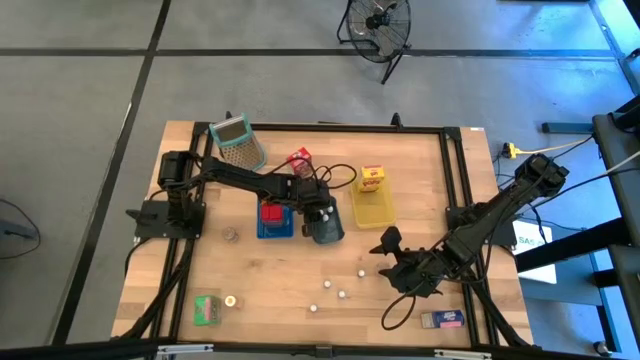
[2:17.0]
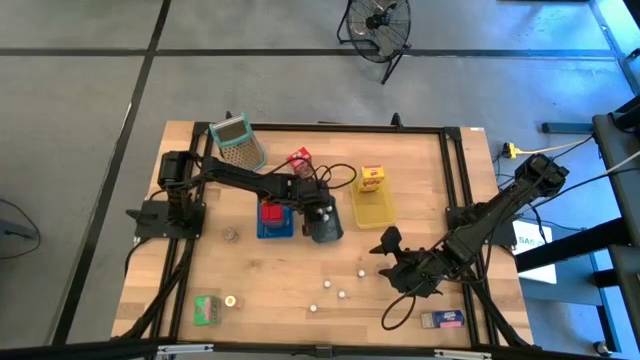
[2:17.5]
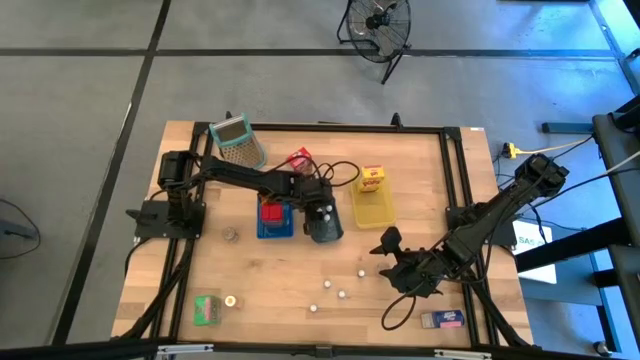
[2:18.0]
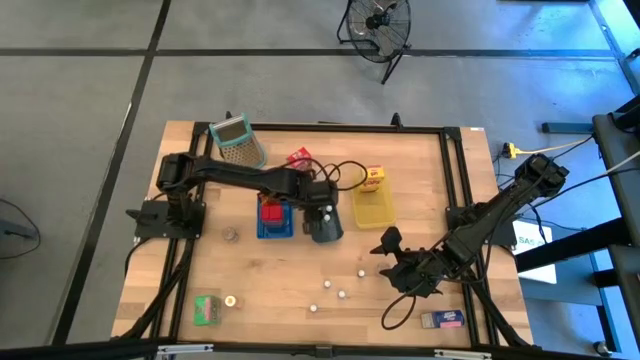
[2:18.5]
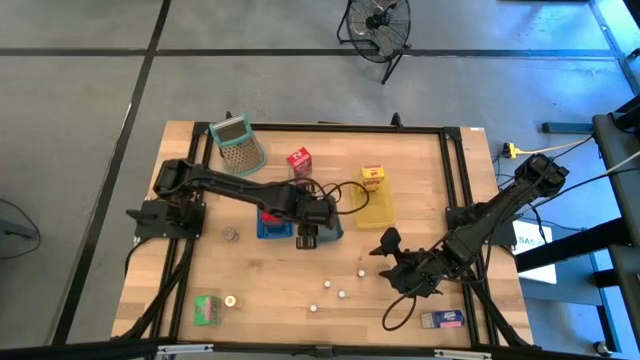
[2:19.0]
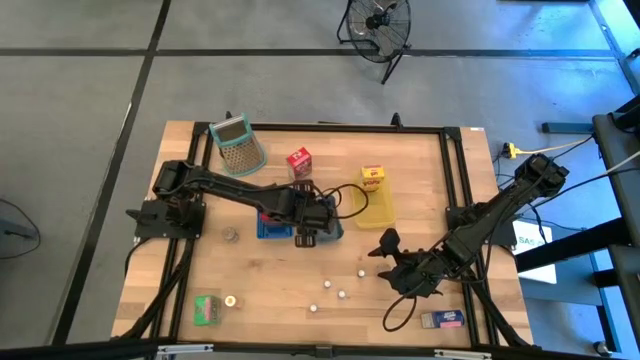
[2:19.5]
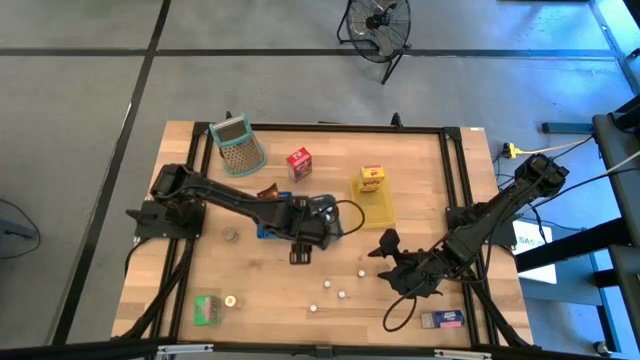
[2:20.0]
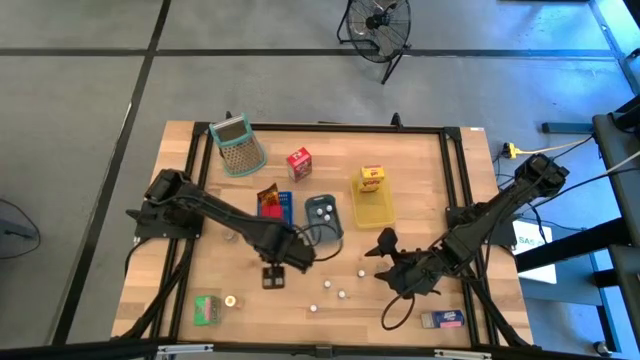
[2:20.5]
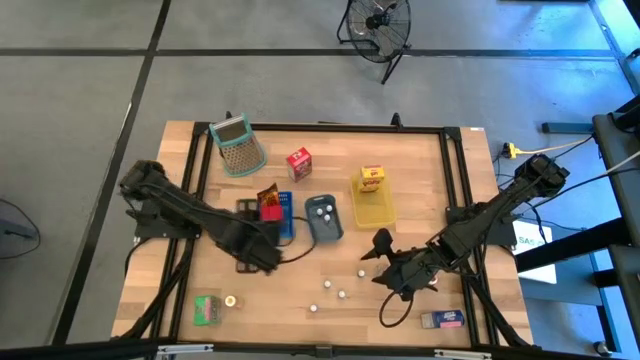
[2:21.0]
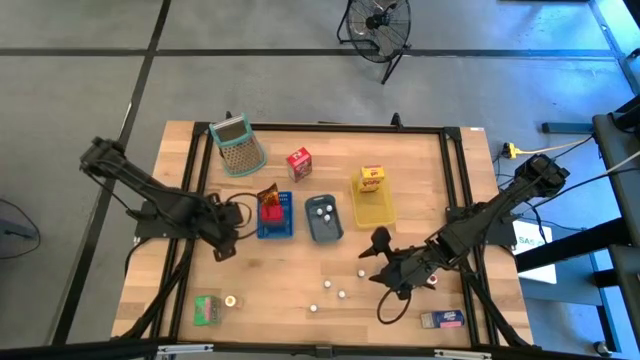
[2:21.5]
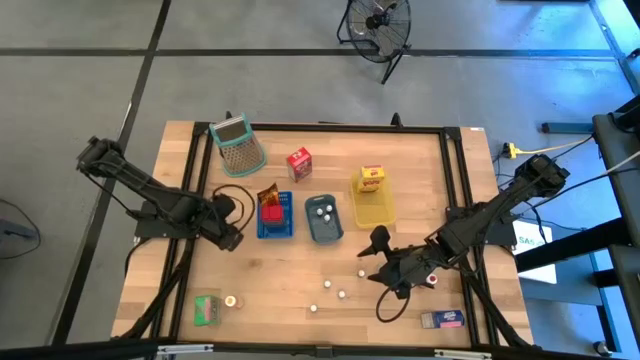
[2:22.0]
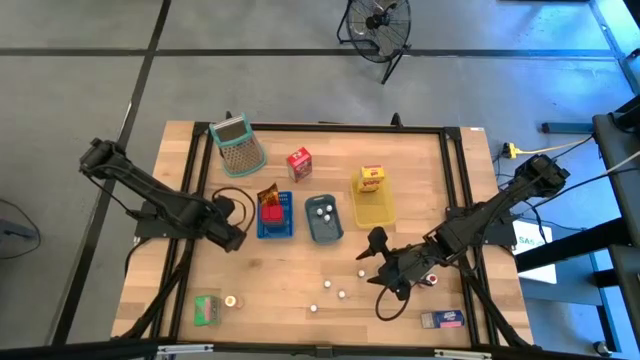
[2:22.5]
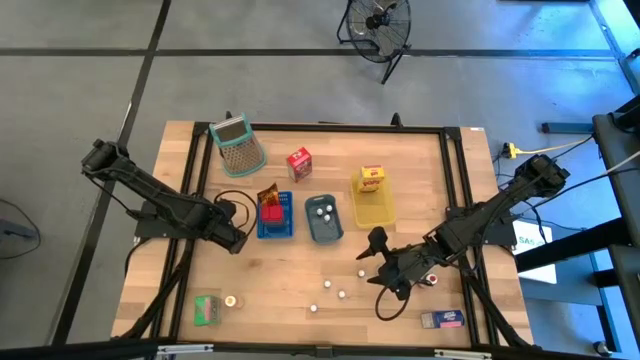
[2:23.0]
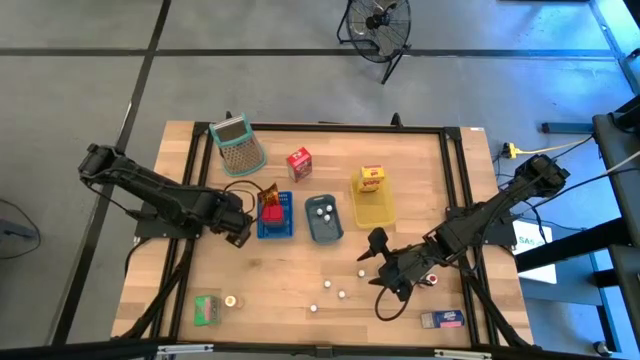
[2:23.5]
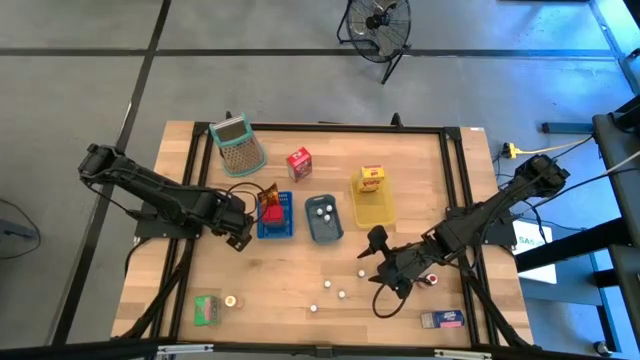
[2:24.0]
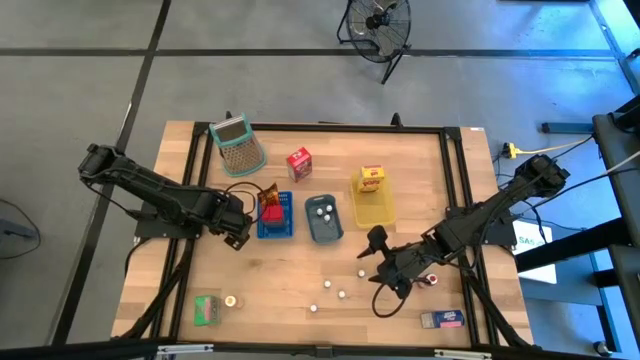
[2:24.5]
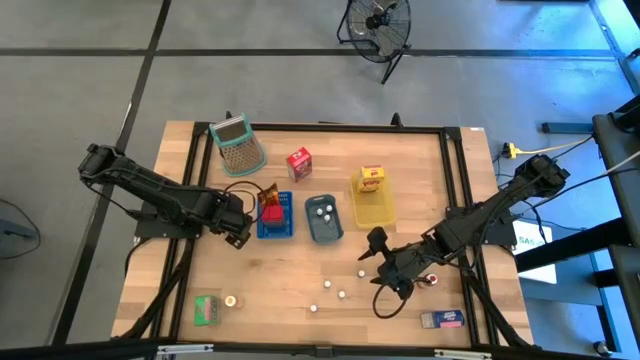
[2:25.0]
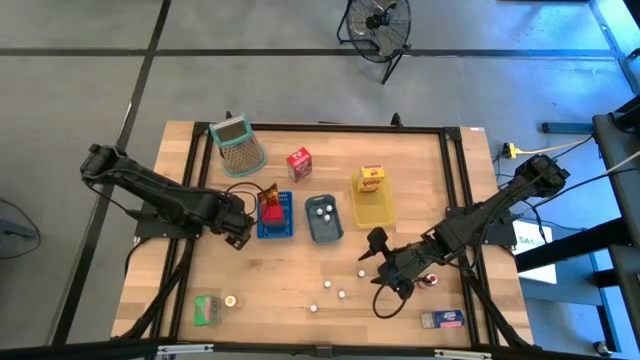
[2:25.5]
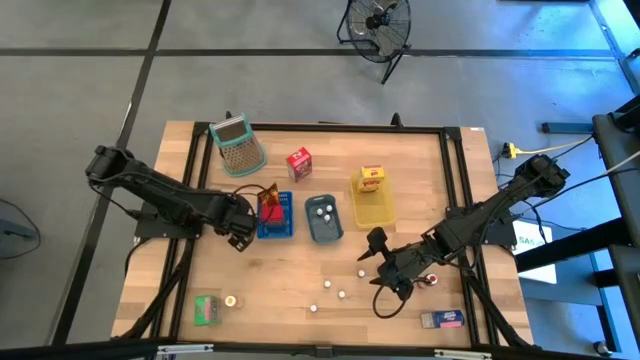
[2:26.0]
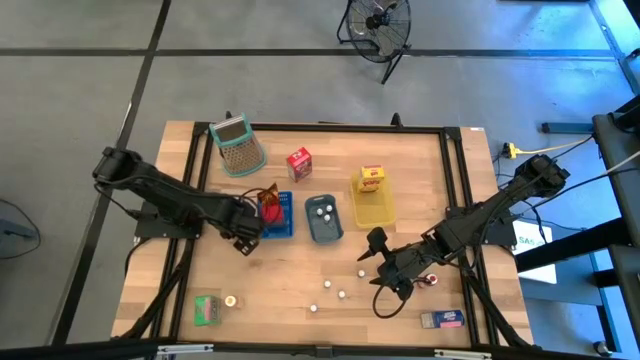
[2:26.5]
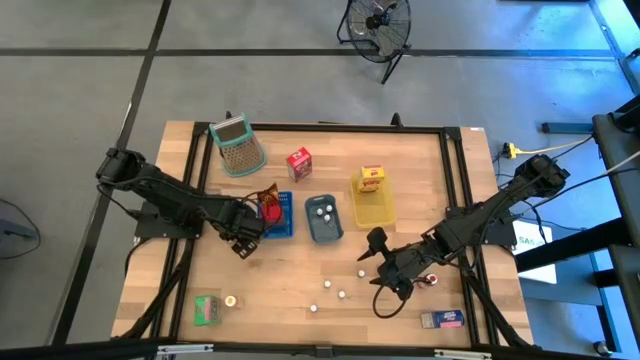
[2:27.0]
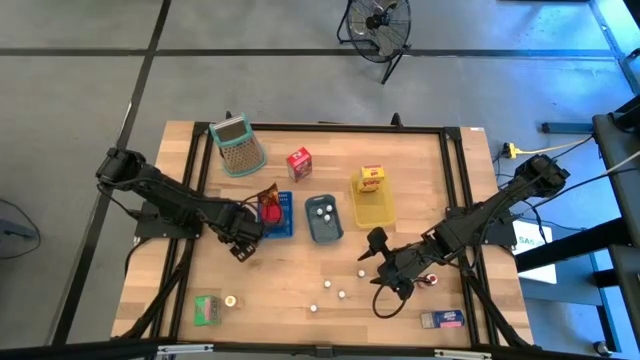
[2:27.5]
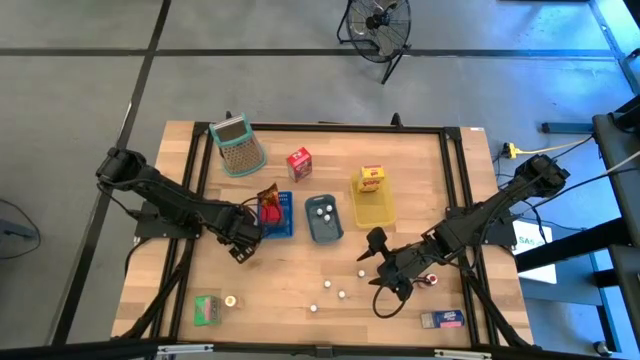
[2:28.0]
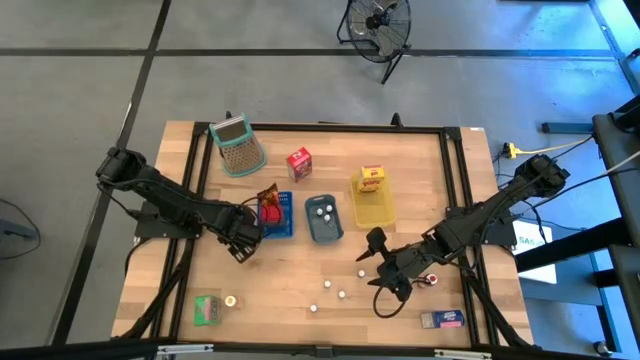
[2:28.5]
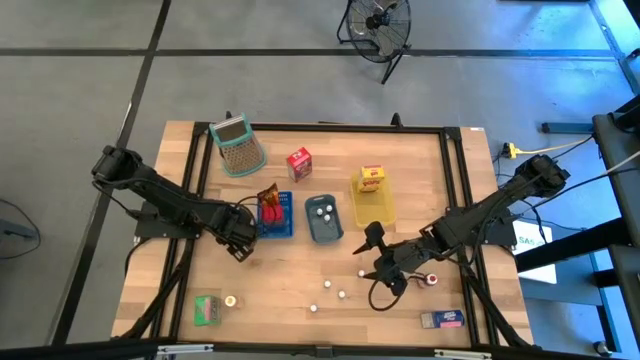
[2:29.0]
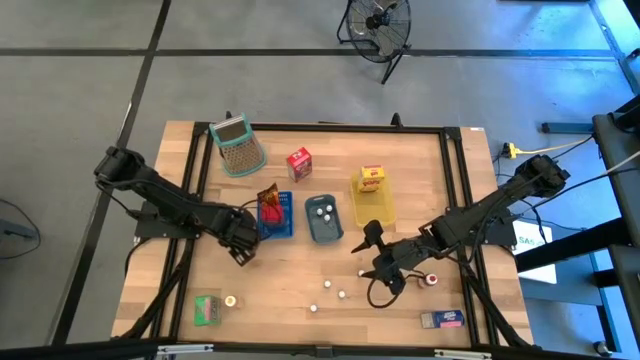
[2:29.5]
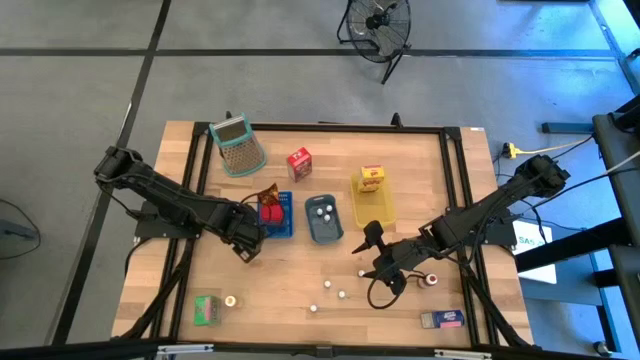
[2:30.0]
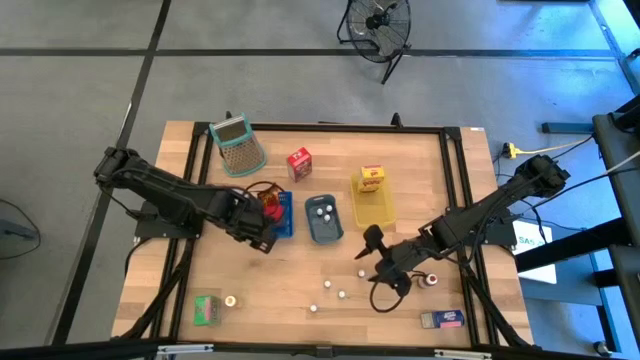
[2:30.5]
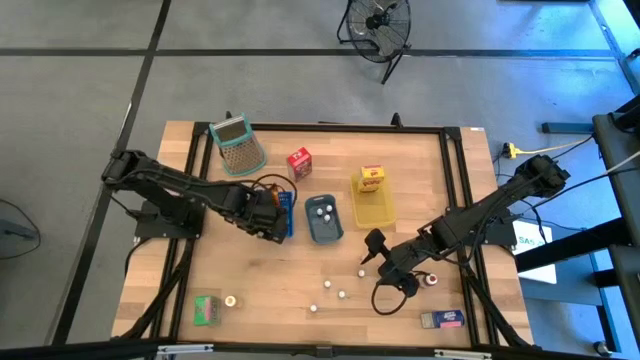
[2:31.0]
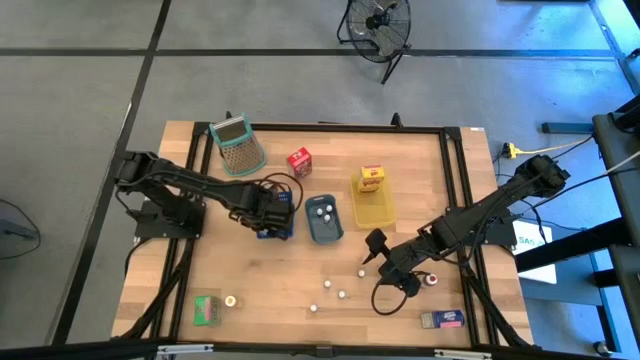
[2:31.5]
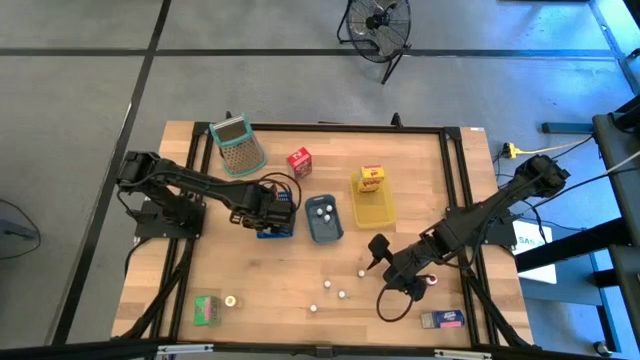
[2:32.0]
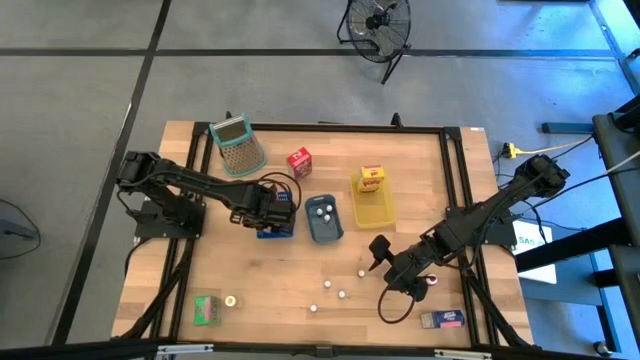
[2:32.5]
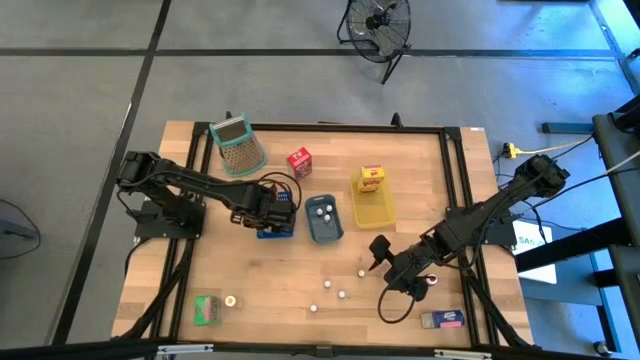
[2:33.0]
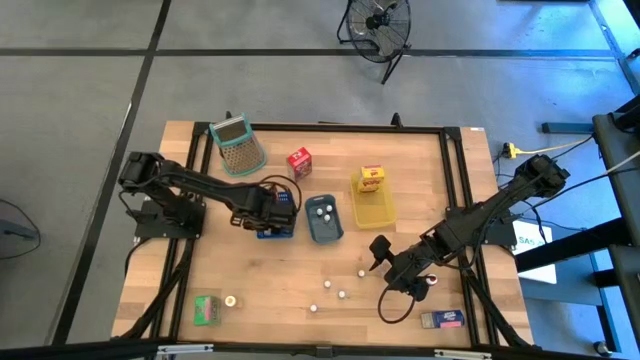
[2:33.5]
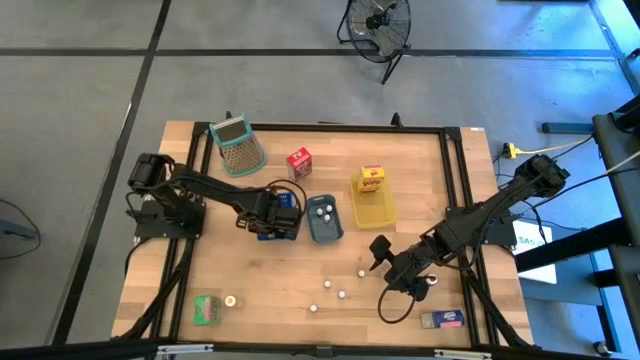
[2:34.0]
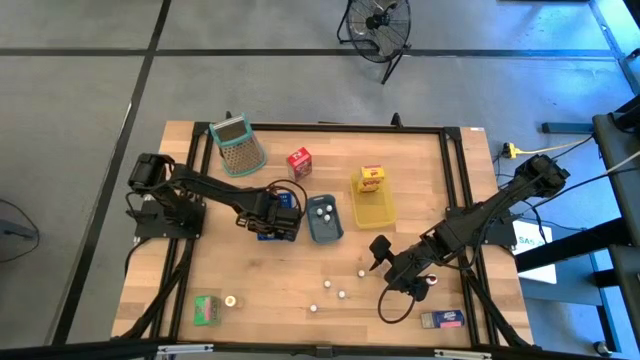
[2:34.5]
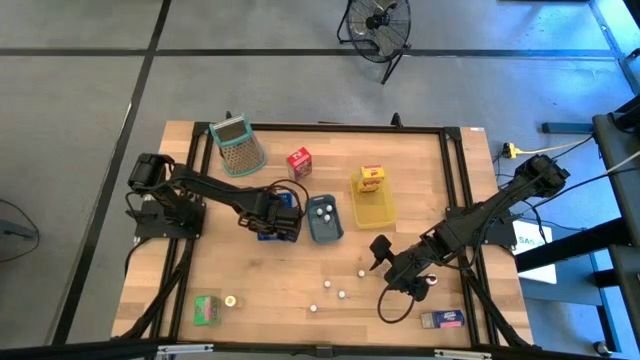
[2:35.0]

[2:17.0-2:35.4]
Task: Pick & Place Kitchen Items
Put the left brown seasoning bottle into the blue bin

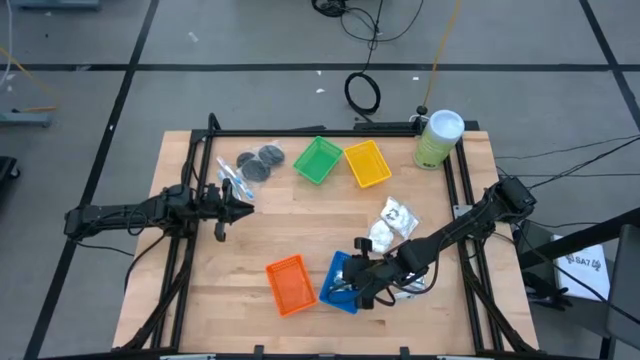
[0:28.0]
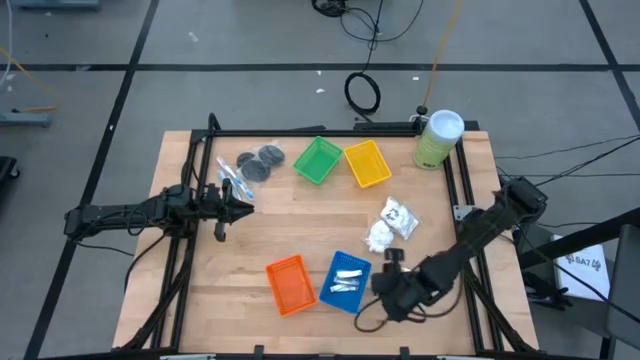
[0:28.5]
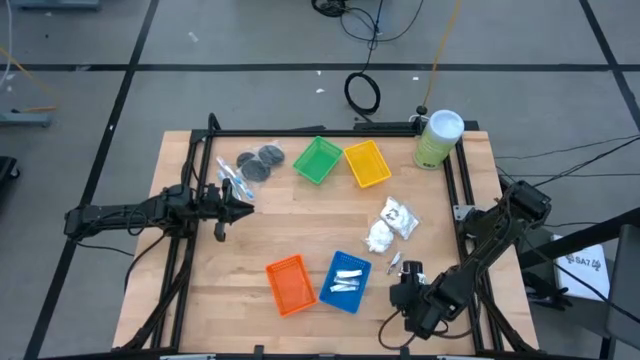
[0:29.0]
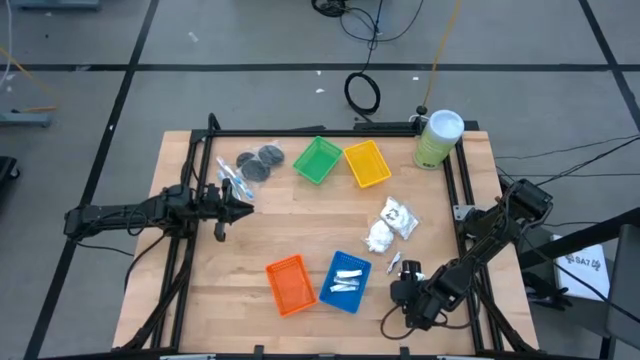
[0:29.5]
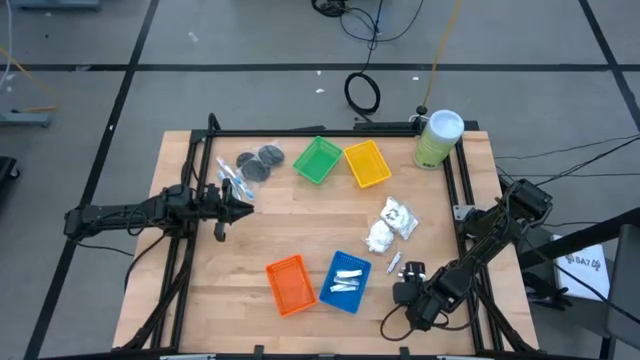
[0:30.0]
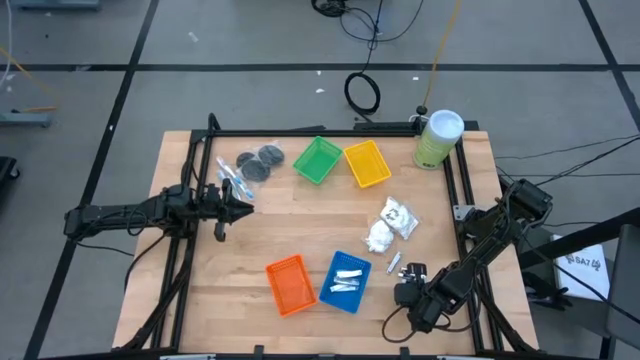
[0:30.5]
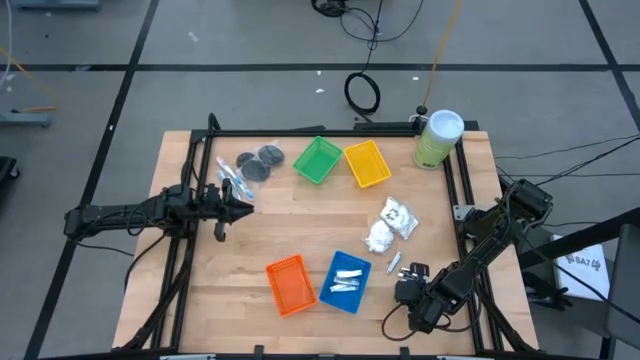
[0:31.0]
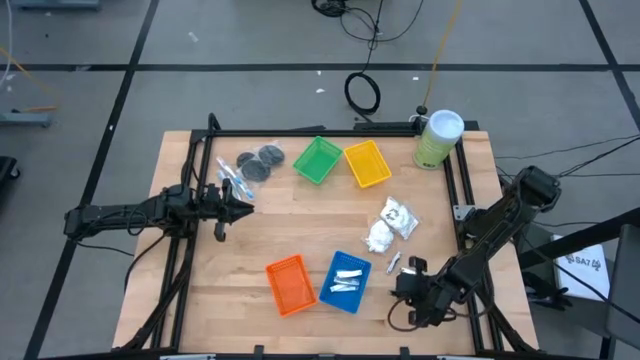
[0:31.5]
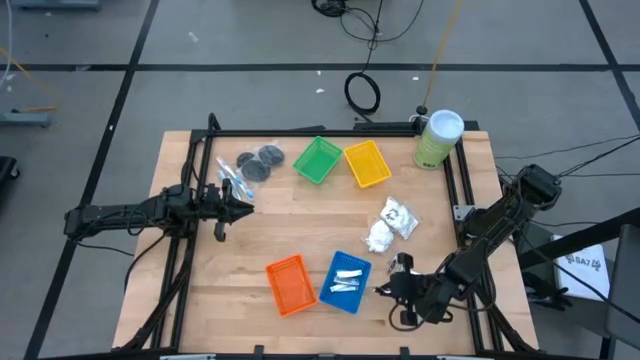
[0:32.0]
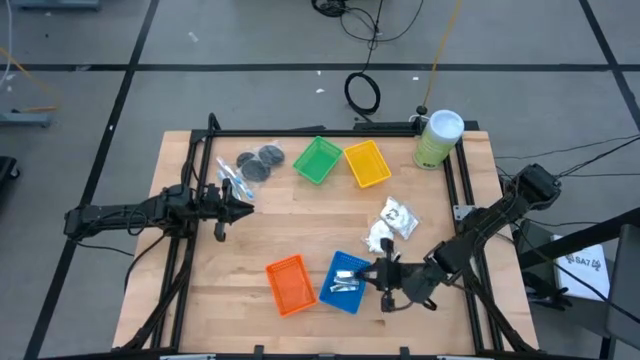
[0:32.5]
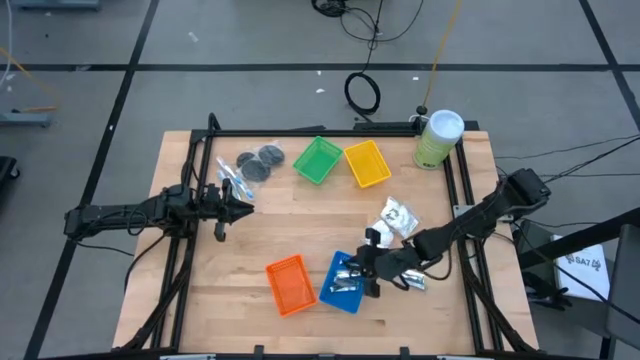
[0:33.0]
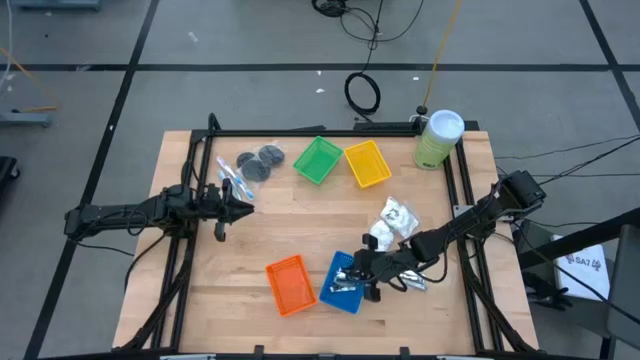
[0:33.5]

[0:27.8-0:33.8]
Task: Pick & Place Travel size toiletries
Put the silver nail cutter into the blue bin
